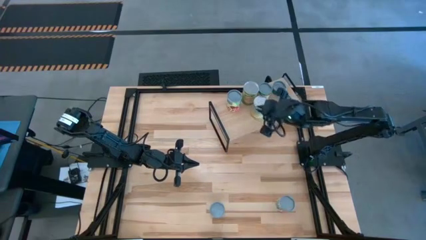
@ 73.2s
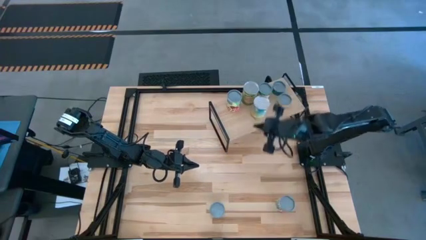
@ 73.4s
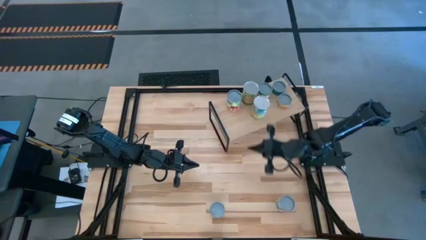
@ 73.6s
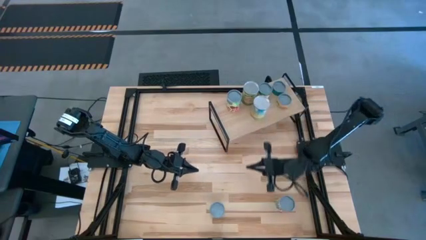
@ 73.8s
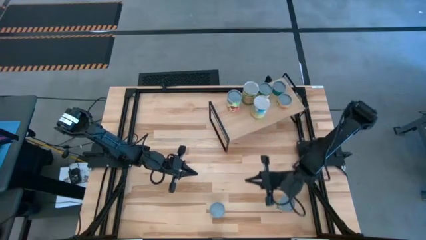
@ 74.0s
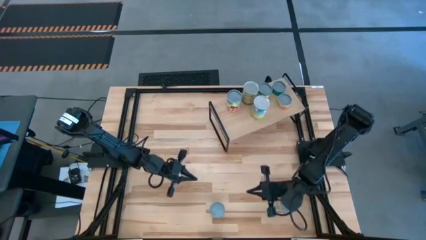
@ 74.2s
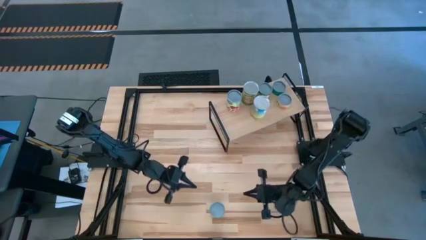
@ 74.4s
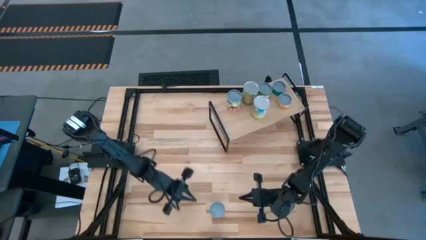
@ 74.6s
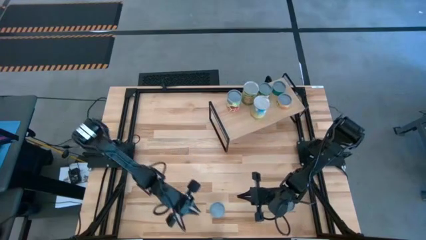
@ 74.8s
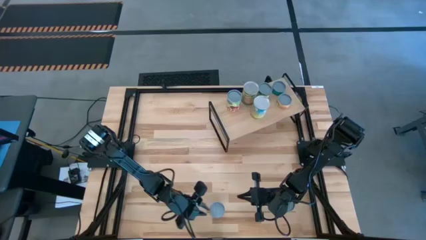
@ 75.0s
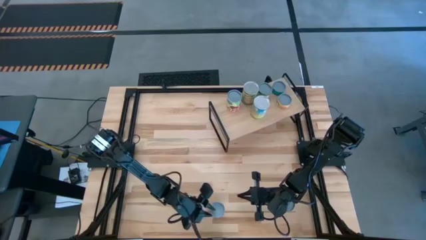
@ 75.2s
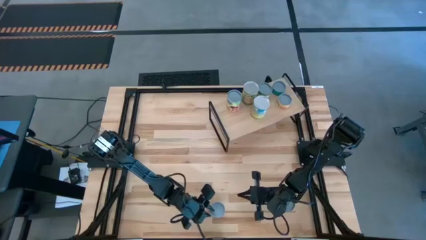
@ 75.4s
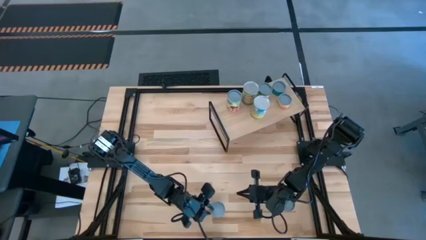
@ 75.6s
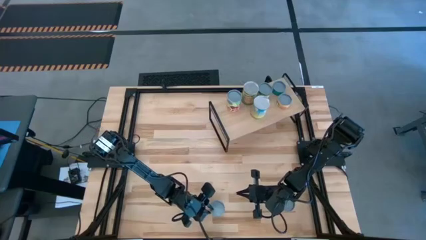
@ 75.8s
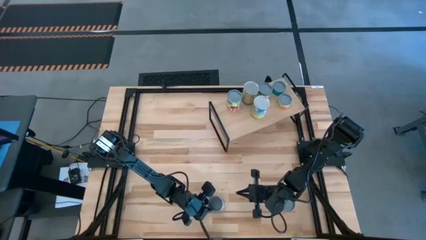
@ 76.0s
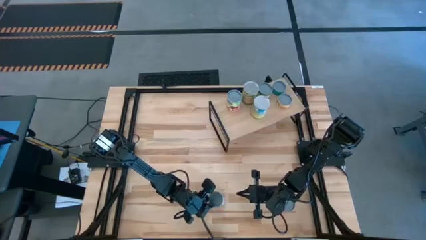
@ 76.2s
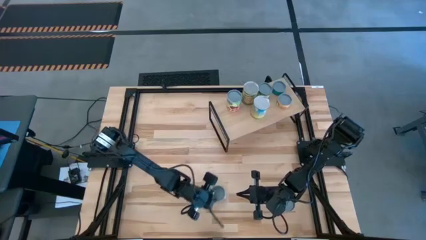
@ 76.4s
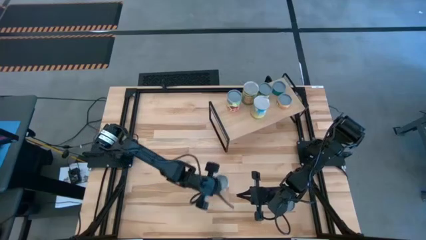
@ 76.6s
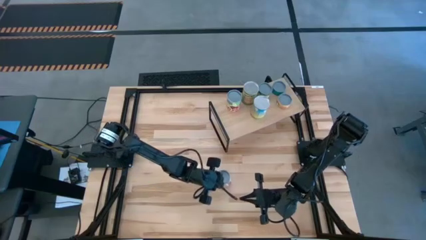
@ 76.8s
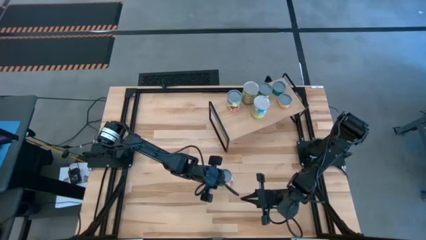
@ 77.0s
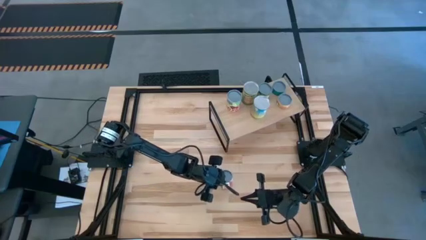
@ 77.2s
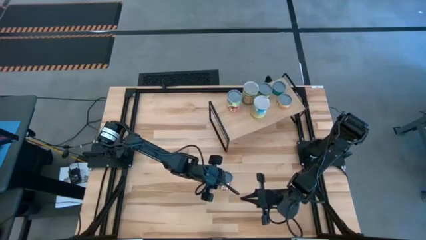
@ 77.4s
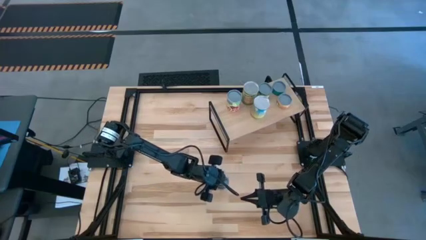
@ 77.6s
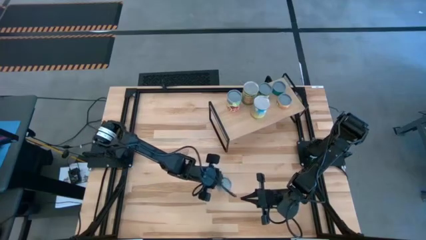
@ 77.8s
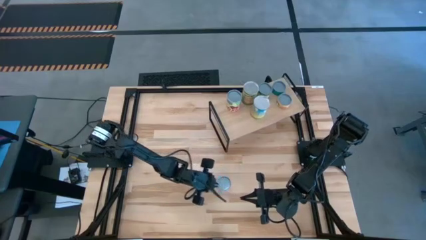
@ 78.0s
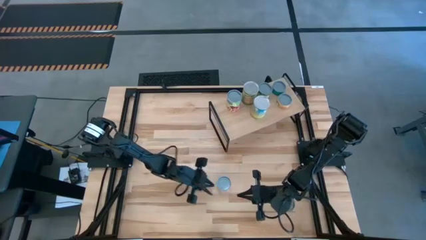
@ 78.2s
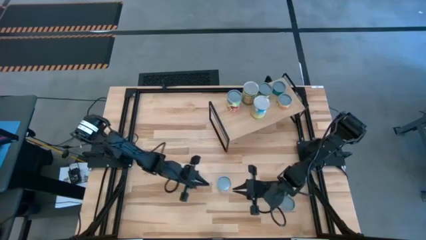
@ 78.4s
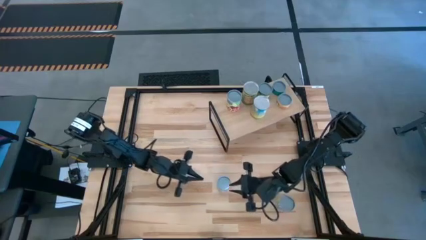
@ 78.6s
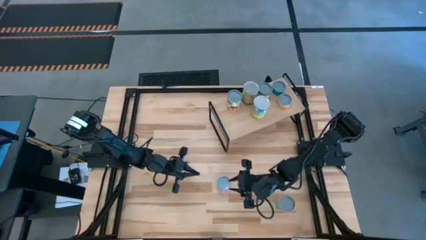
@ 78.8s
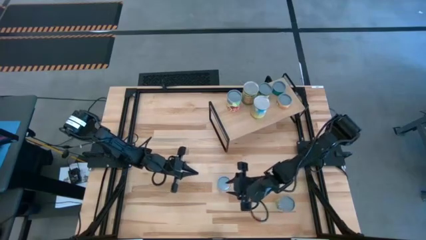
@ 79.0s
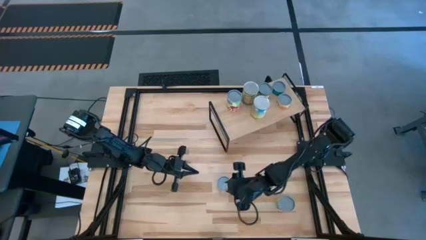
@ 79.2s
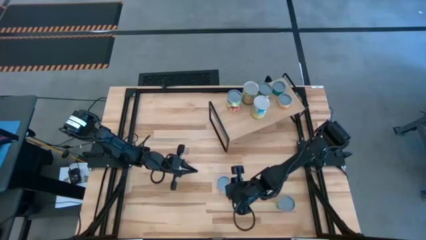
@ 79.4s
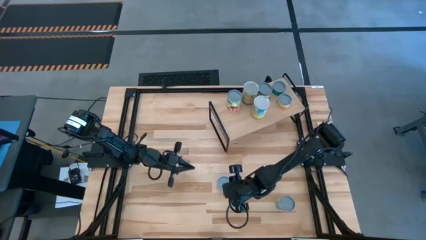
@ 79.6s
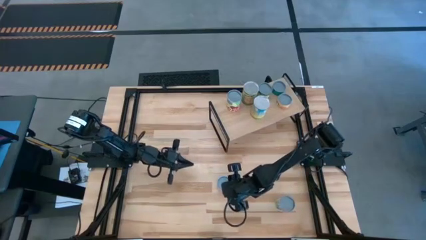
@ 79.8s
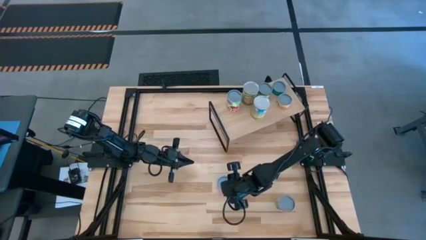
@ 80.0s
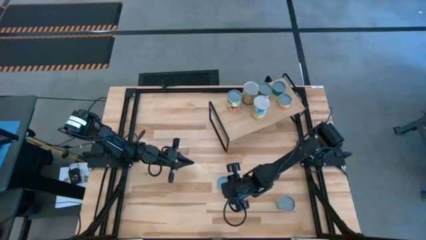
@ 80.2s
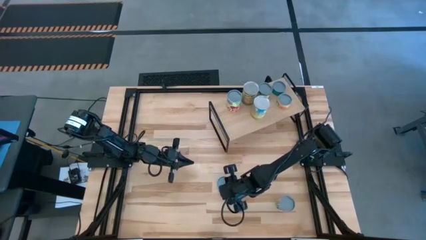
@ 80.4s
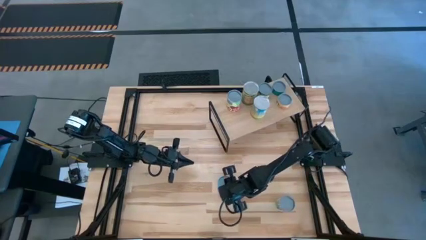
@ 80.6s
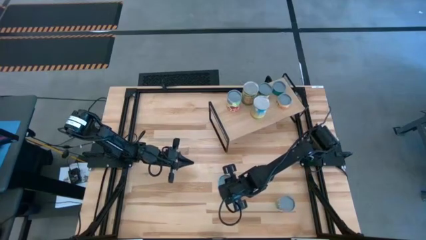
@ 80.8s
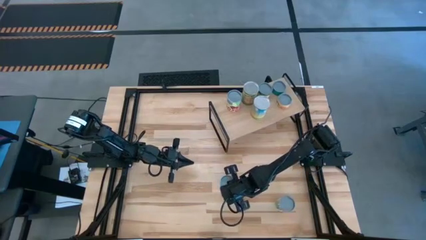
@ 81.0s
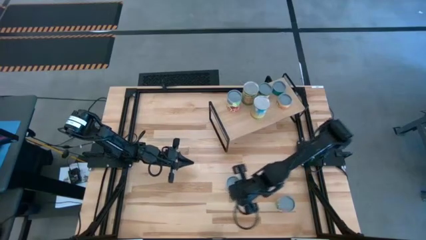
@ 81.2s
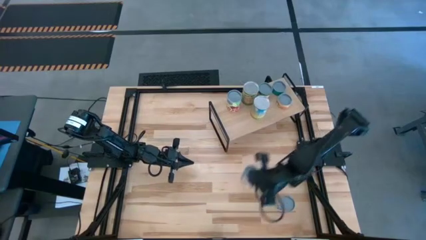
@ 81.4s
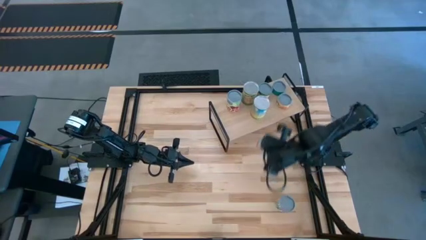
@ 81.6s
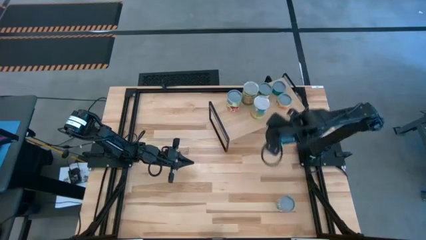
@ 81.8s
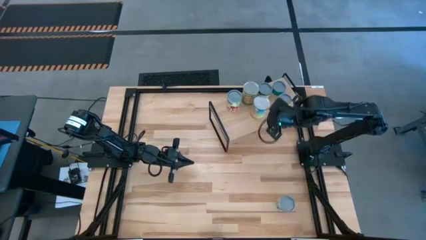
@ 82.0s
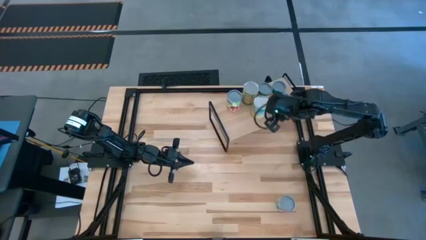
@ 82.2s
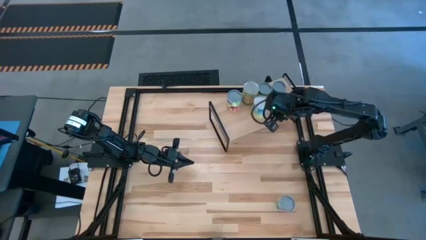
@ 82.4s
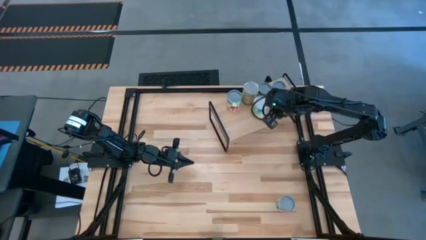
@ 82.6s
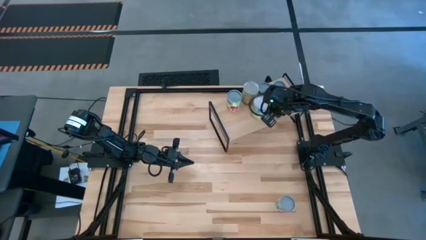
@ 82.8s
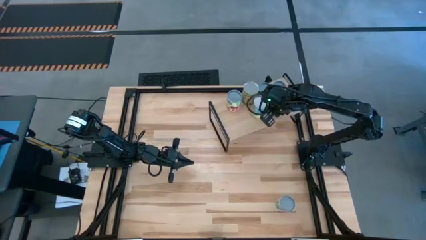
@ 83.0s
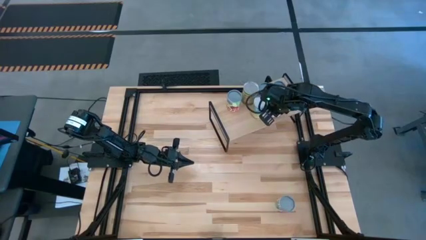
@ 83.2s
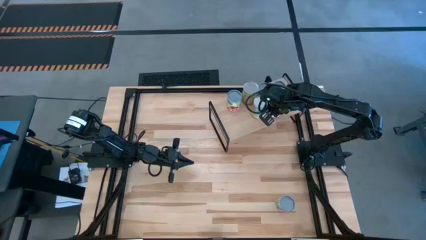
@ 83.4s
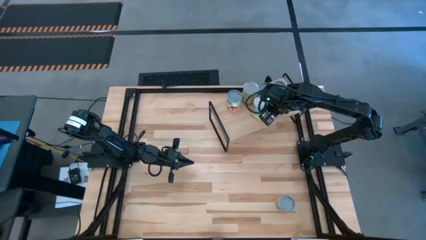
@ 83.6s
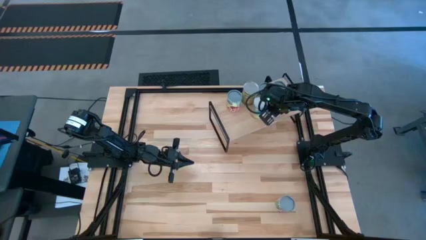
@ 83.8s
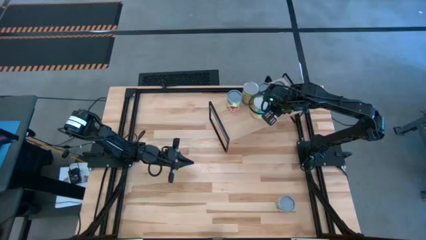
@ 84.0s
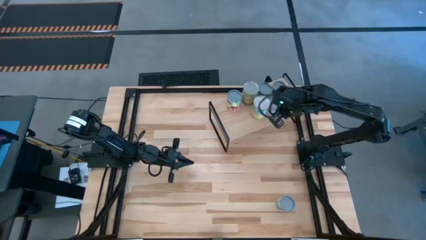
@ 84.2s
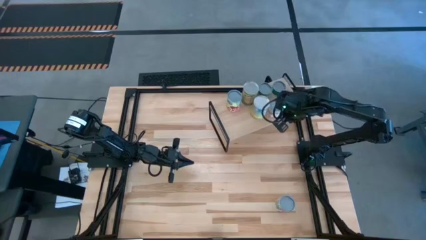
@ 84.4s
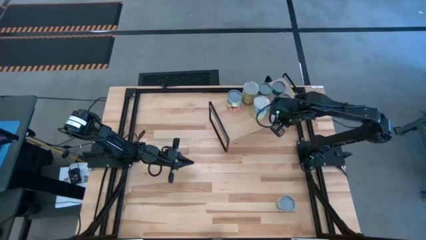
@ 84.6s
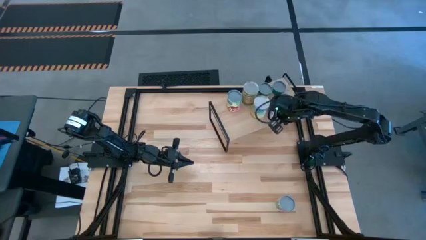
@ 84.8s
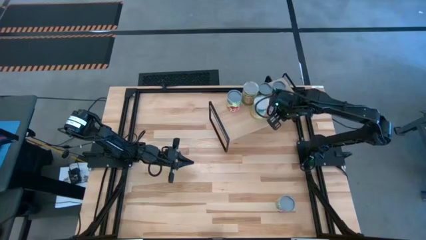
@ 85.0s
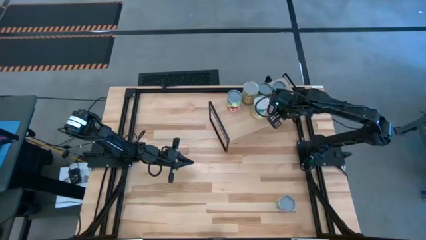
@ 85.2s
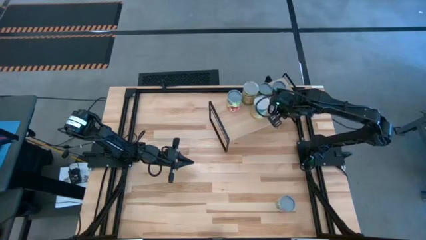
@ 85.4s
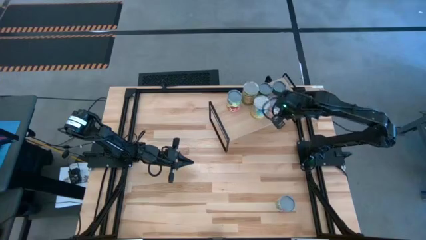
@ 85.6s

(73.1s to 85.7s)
Task: Pick and place cans onto a shelf
Put the canned diced tomatoes on the shelf
